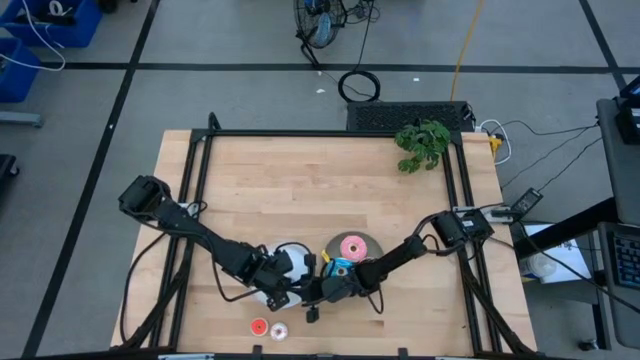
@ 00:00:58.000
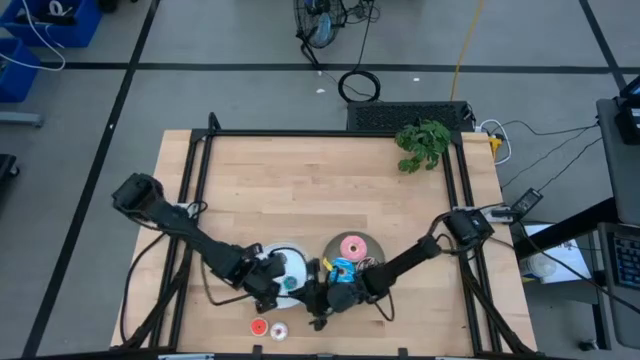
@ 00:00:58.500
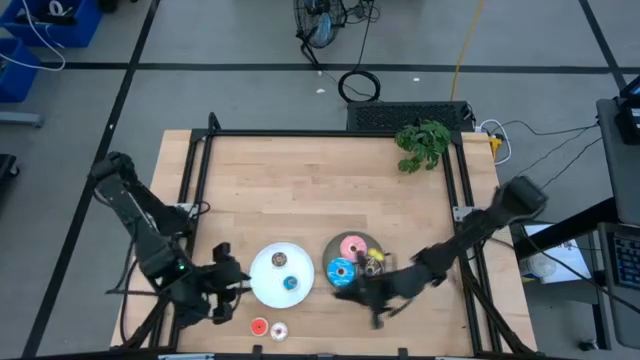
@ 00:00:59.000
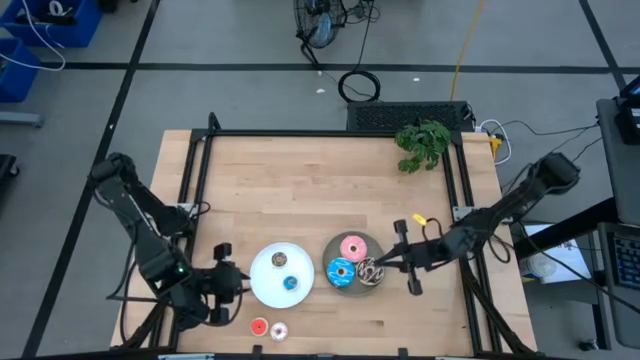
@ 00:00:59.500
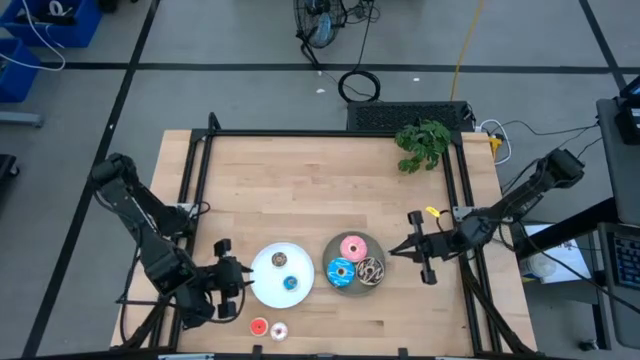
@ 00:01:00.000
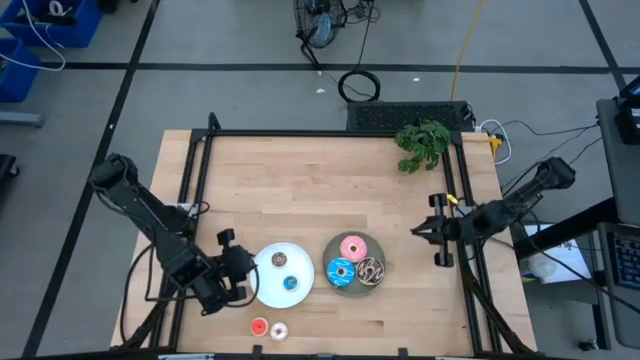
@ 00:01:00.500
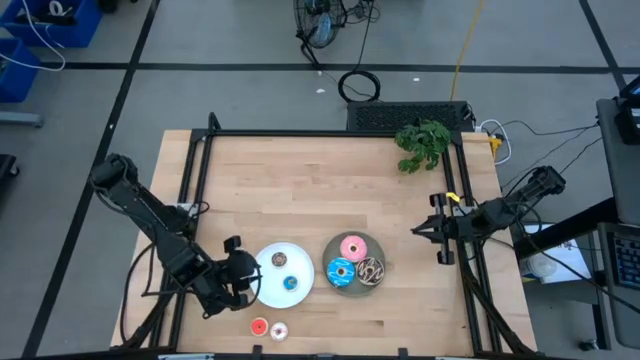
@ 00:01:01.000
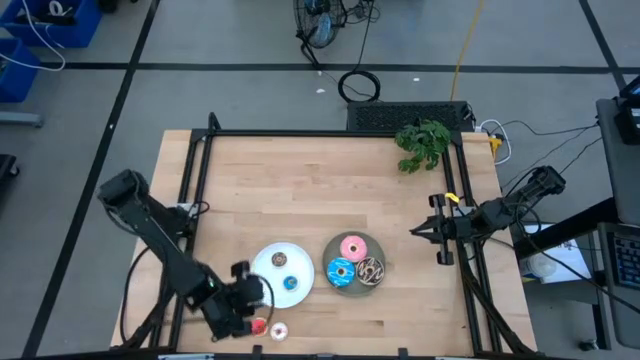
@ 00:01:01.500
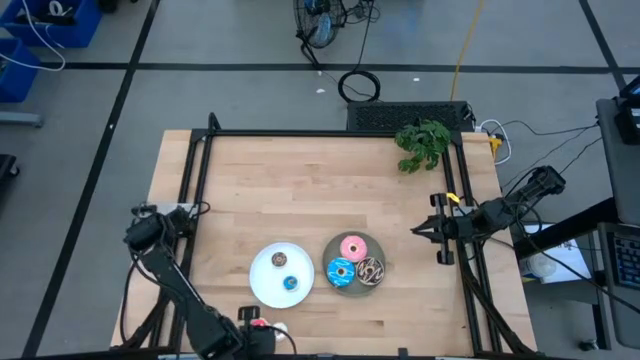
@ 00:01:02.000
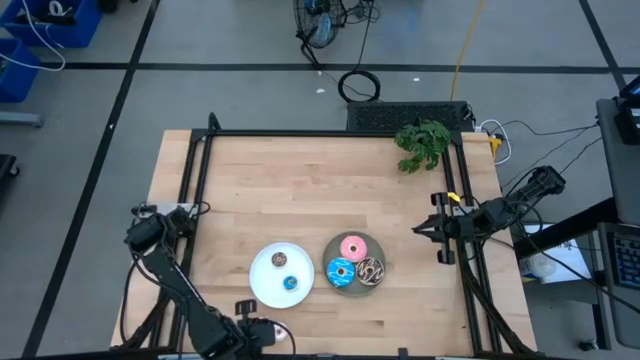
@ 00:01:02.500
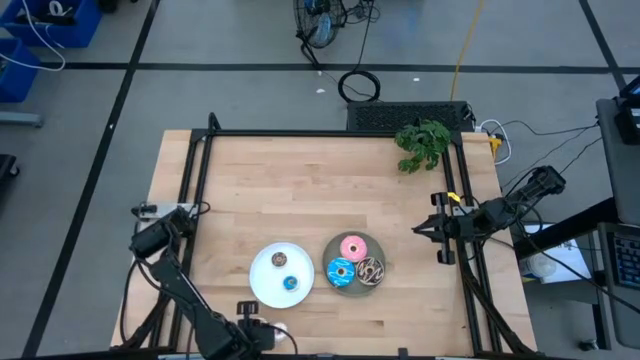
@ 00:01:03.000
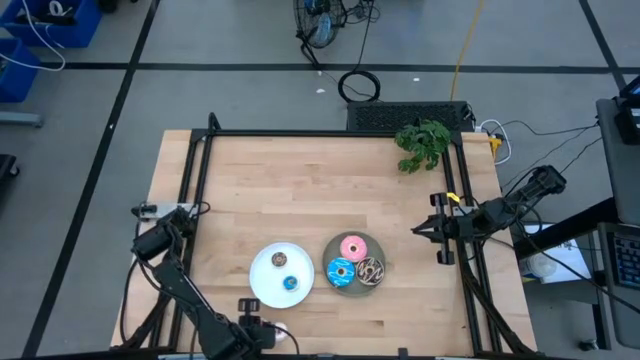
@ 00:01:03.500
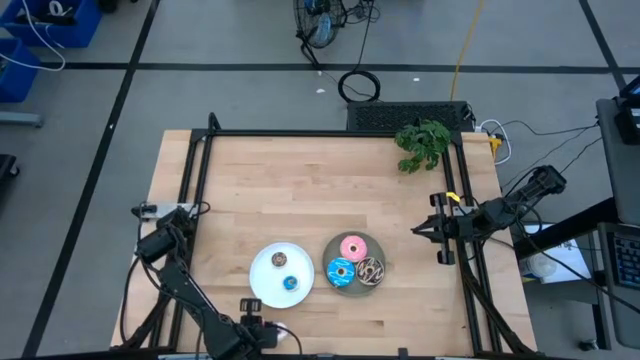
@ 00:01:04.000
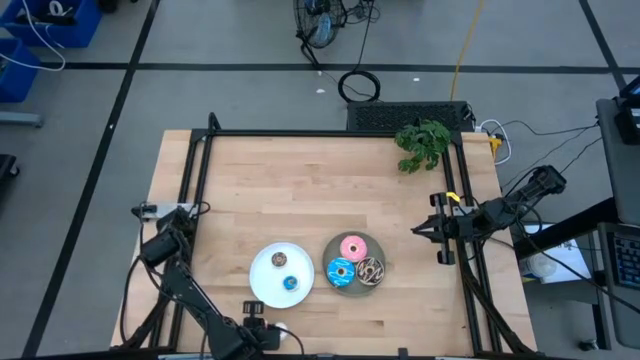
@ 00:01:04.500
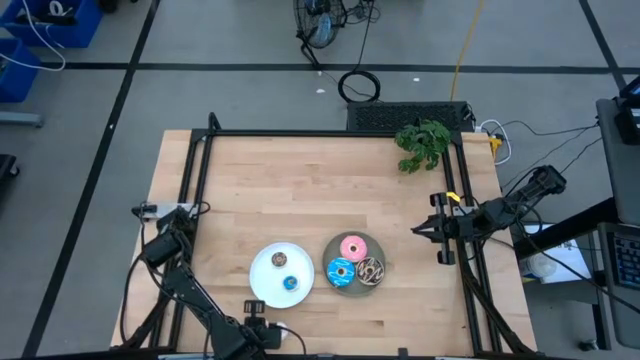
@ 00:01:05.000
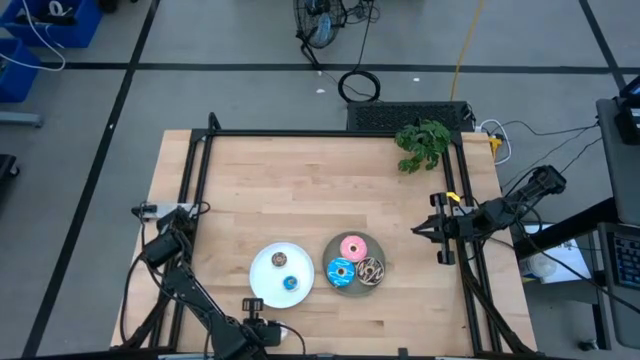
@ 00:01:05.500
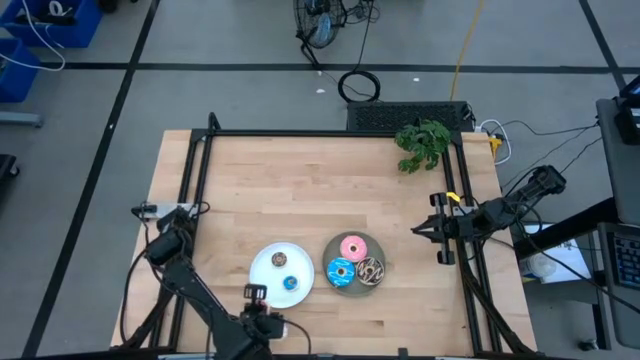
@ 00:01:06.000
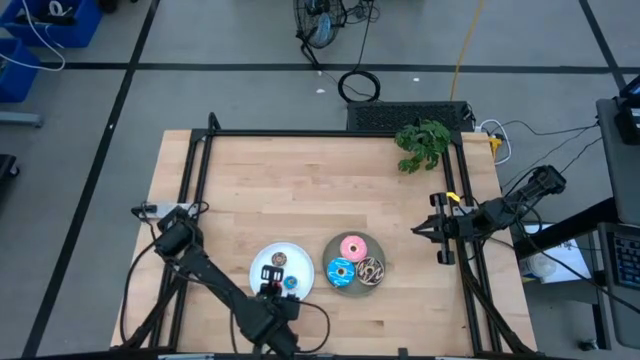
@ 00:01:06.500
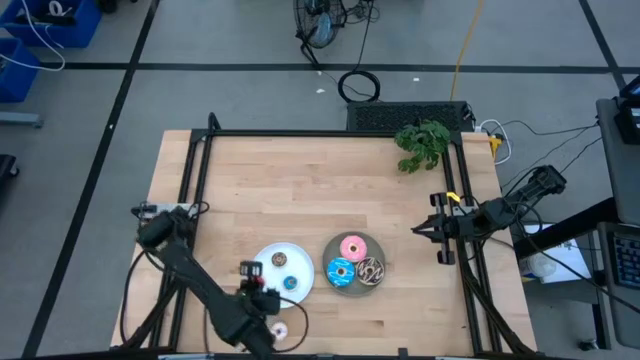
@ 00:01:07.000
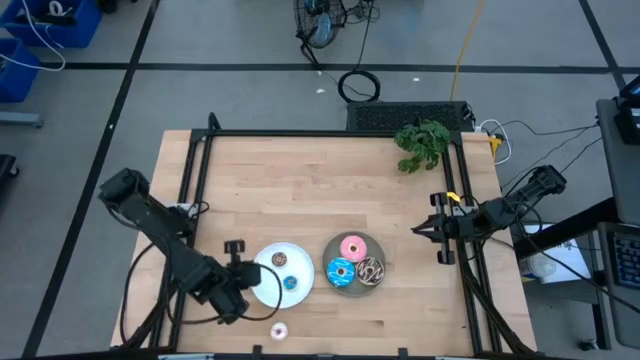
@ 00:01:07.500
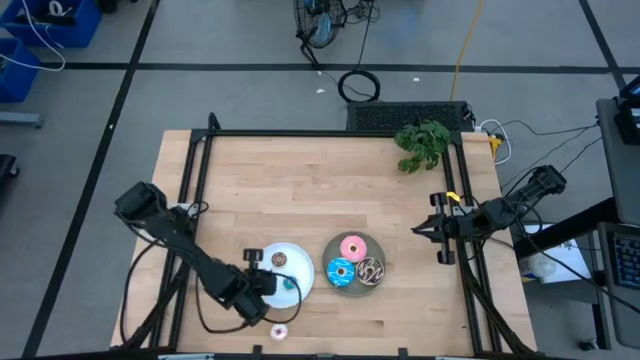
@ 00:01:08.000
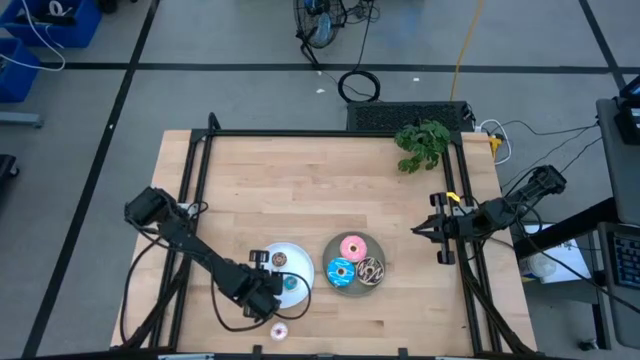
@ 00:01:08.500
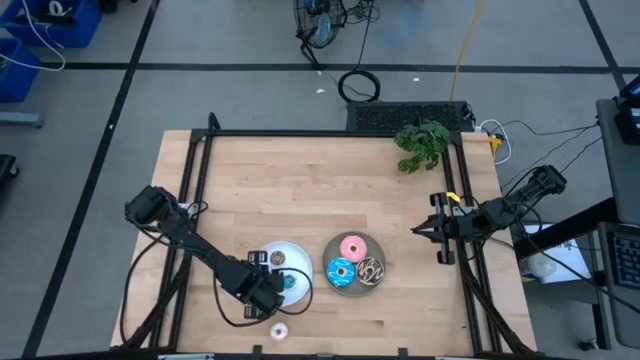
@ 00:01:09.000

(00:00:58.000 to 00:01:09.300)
Task: Pick & Place donuts
Put the small orange donut on the white plate

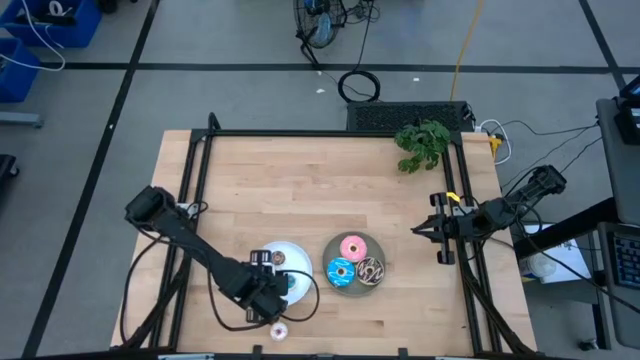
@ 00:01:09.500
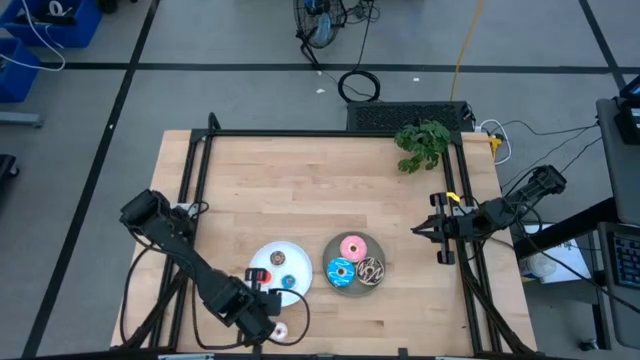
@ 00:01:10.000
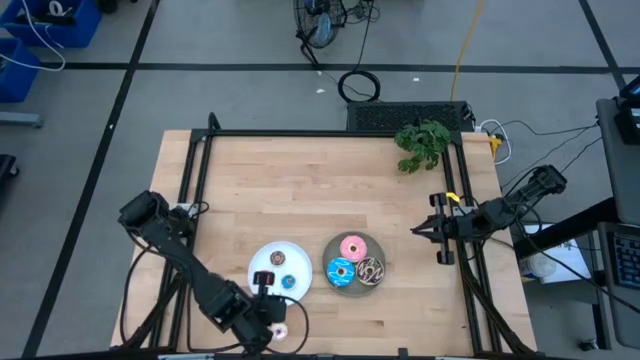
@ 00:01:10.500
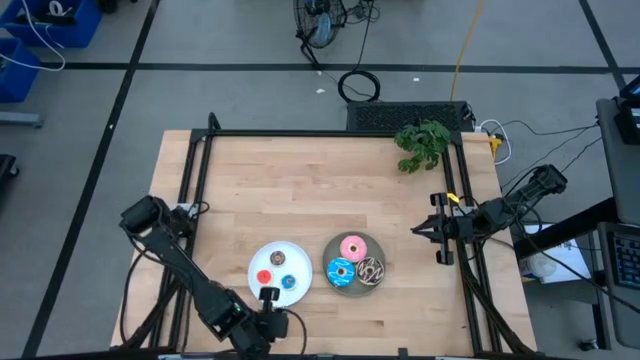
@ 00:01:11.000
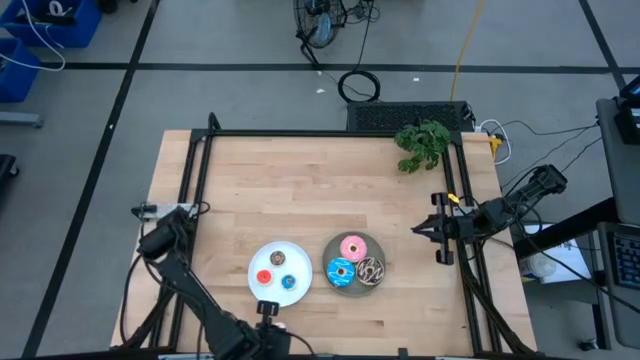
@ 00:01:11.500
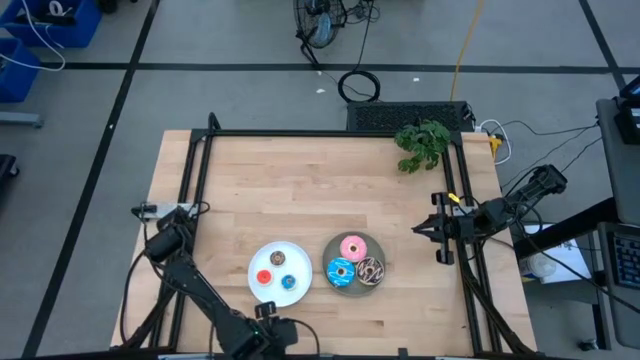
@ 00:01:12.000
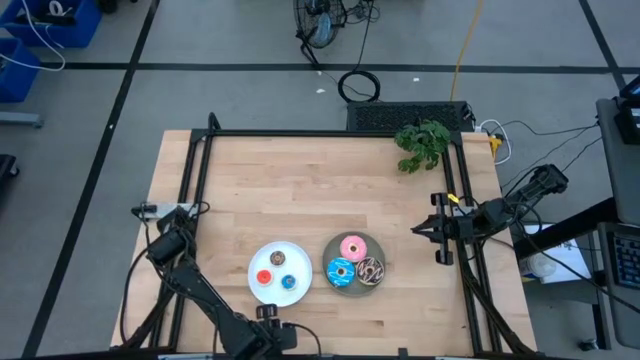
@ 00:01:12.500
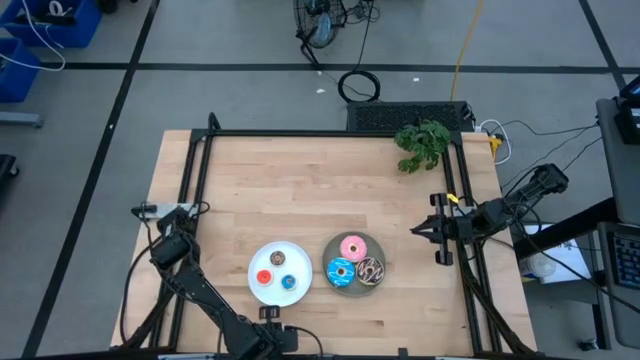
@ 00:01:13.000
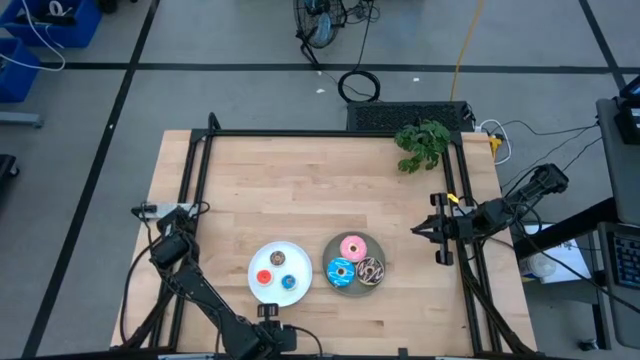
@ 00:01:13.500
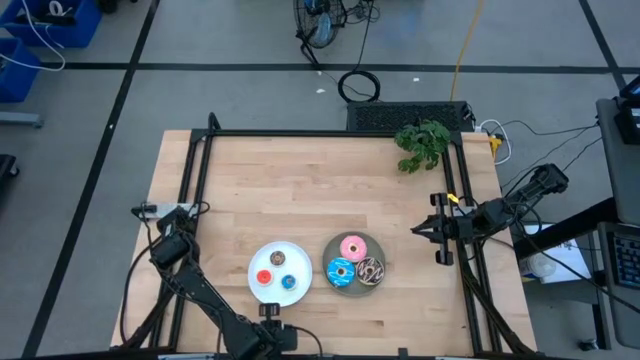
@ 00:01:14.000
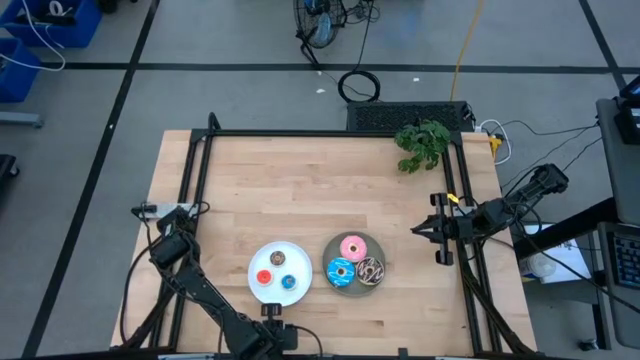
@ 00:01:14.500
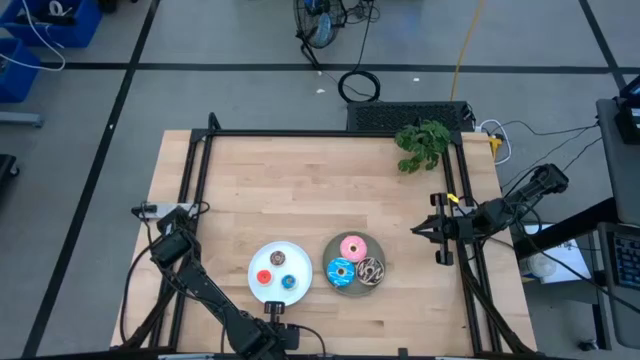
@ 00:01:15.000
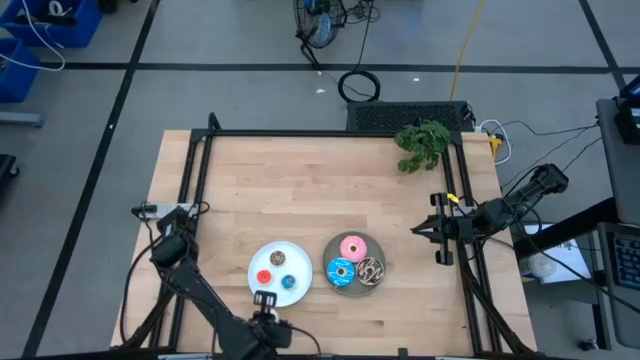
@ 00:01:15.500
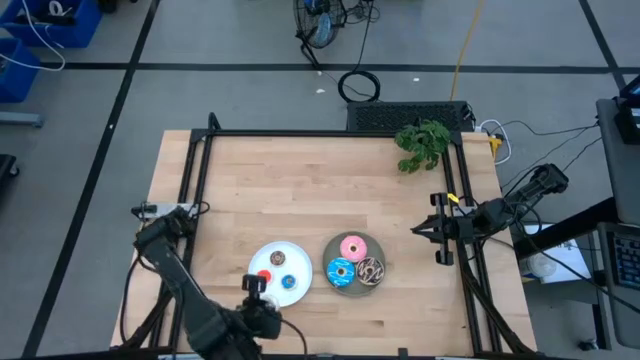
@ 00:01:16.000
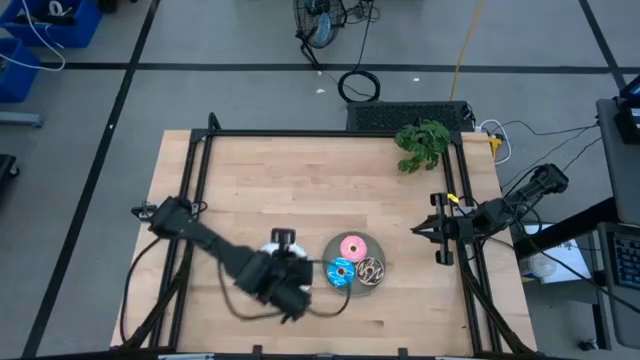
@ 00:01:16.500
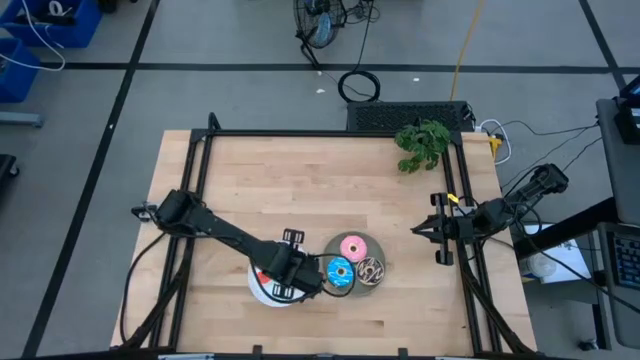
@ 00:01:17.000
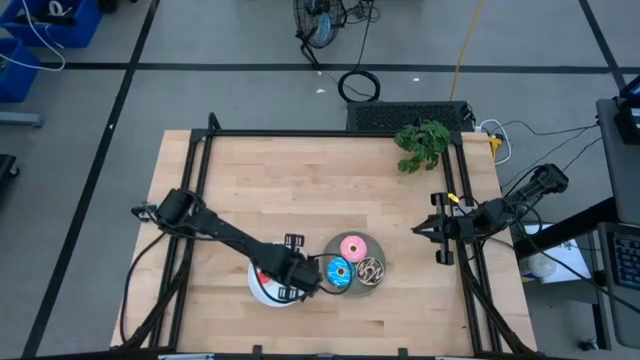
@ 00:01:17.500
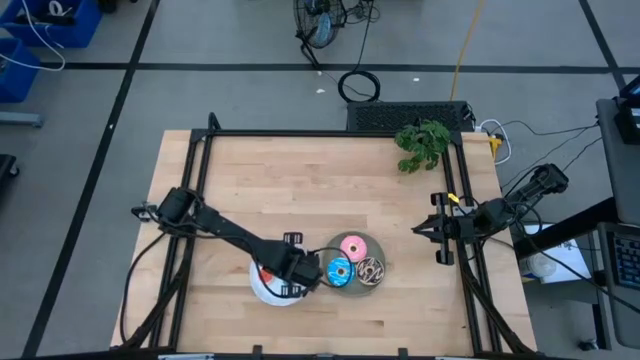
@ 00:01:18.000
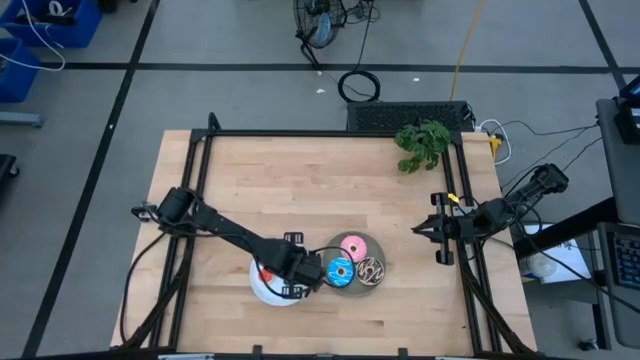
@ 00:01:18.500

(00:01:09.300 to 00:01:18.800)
Put the small white donut on the white plate
